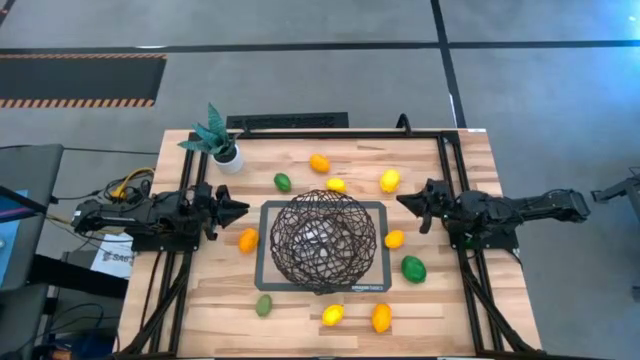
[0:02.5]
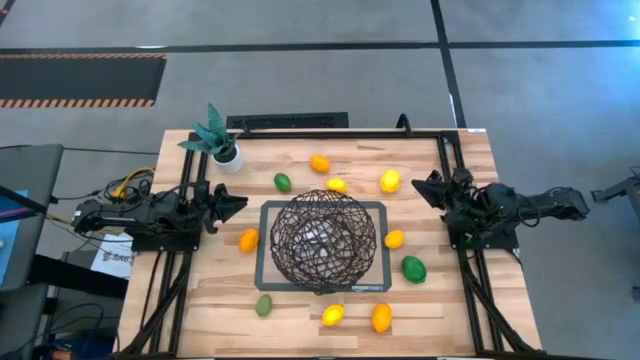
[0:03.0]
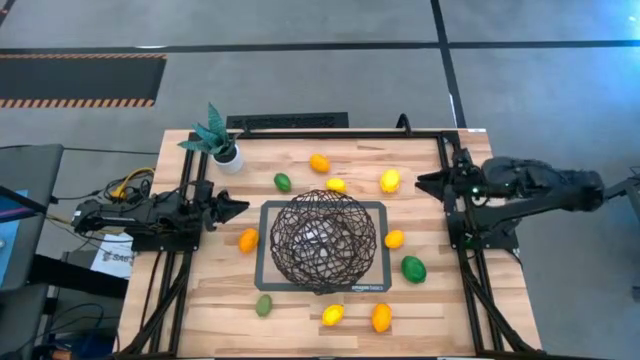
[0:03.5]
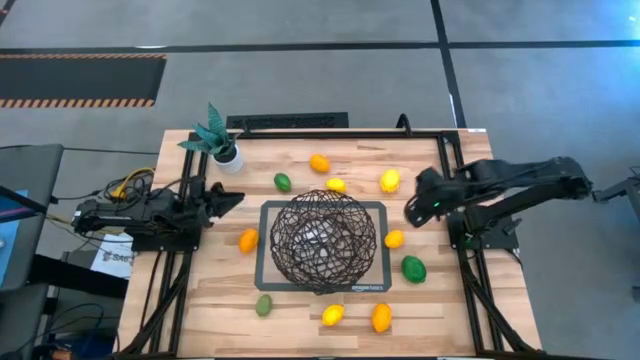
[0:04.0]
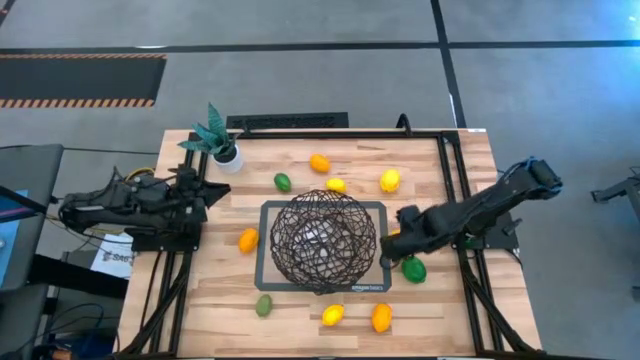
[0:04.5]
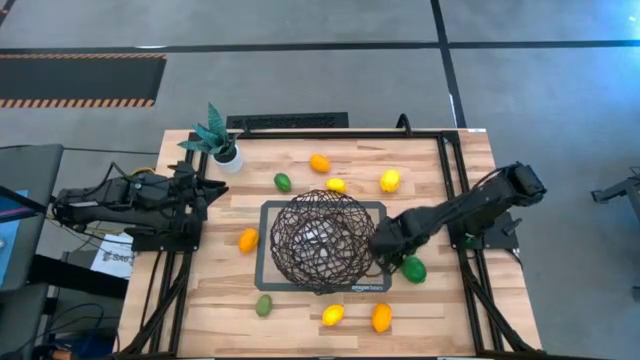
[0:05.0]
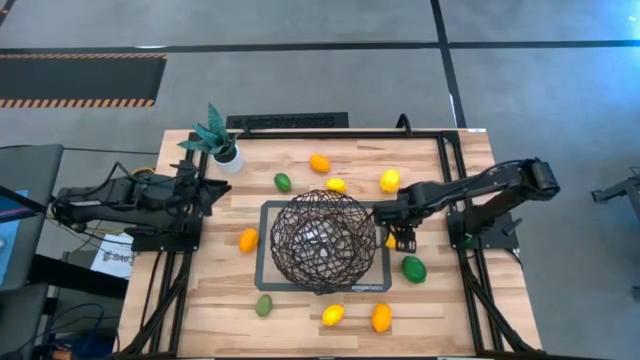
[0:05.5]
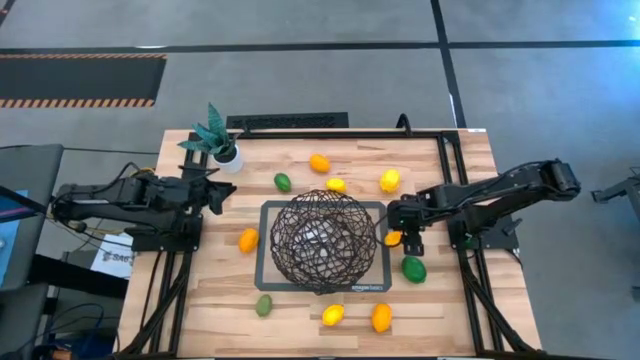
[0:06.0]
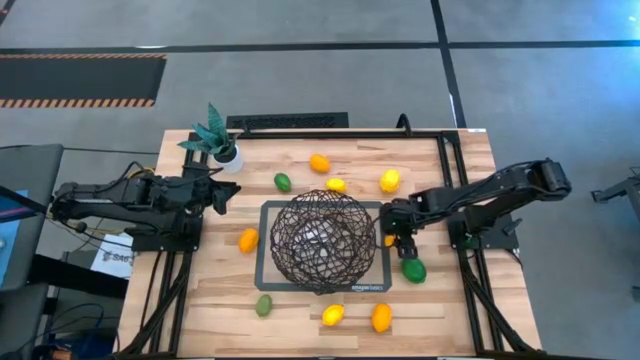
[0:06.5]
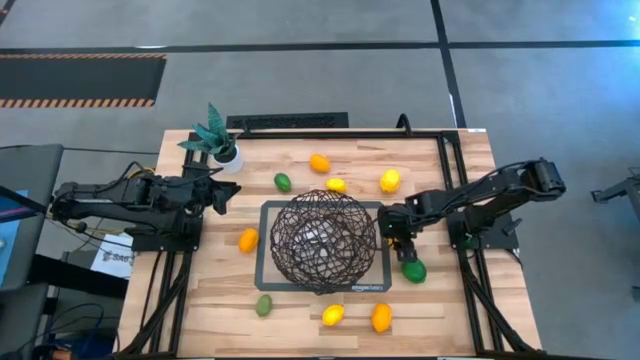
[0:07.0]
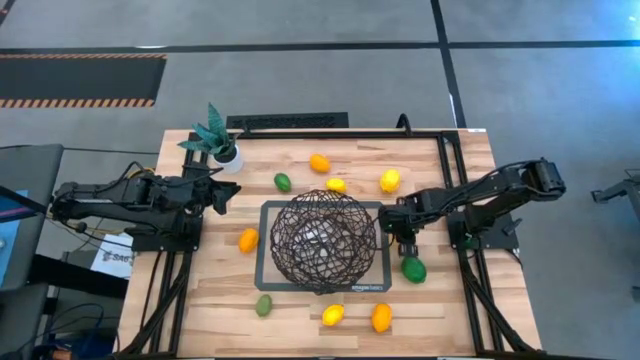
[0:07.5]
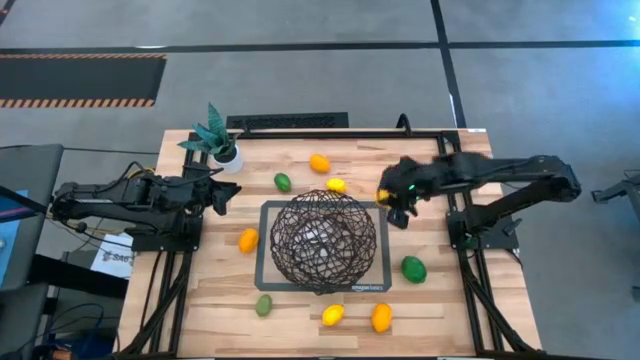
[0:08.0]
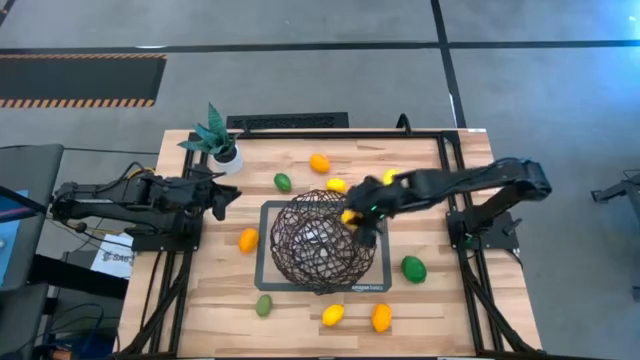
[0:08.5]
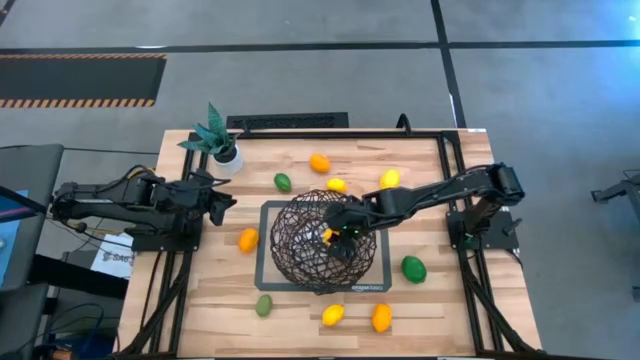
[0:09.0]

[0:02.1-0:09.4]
Task: Build produce basket
Put the lemon into the basket

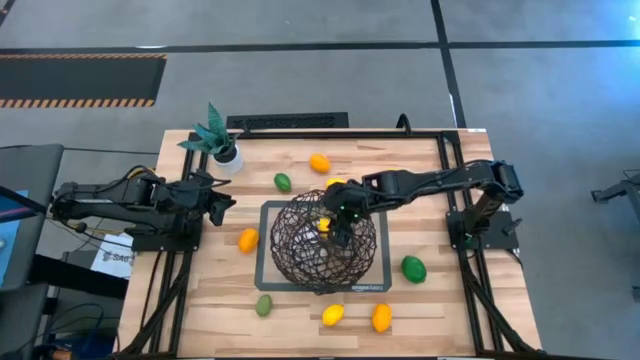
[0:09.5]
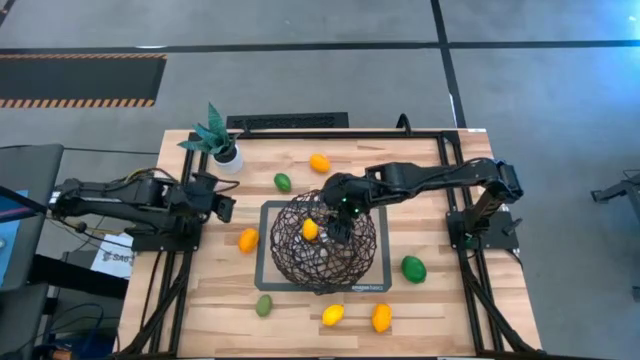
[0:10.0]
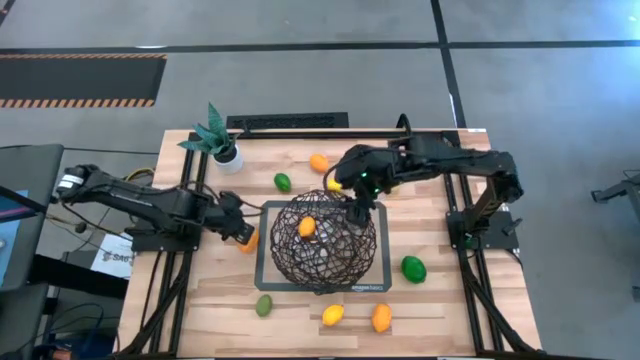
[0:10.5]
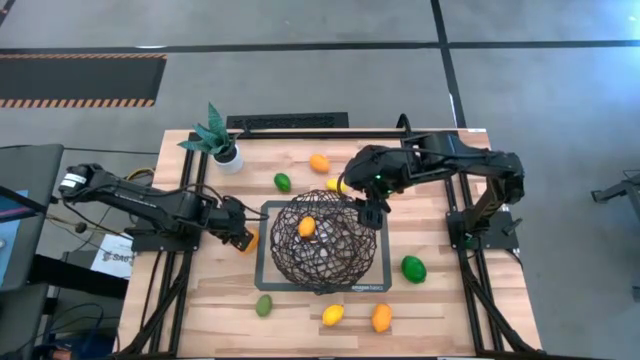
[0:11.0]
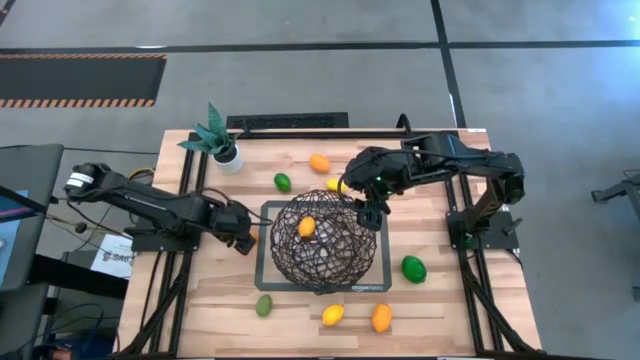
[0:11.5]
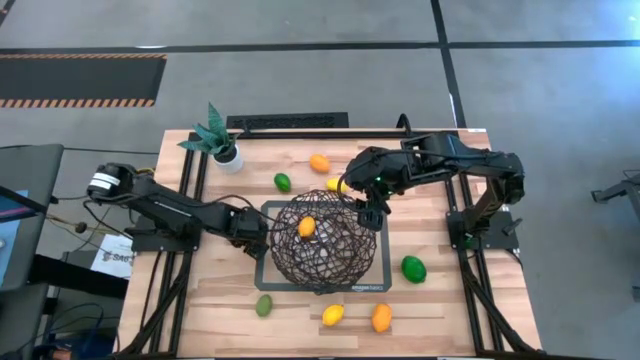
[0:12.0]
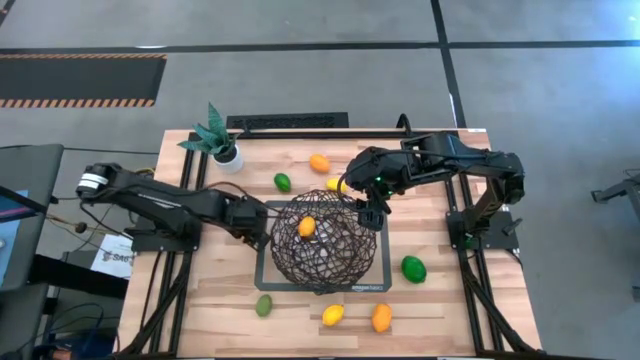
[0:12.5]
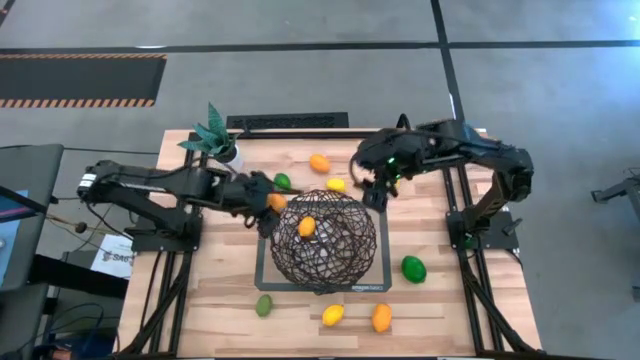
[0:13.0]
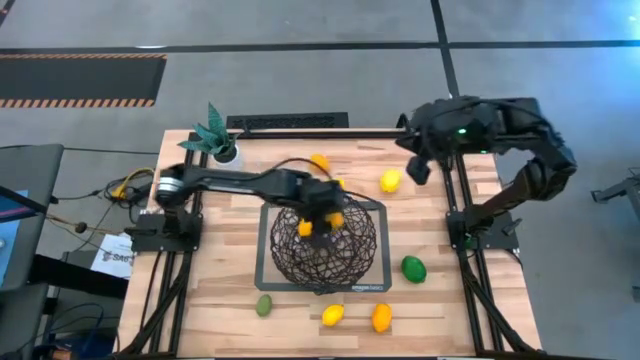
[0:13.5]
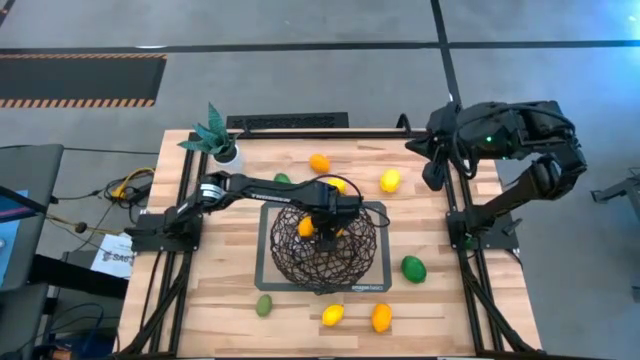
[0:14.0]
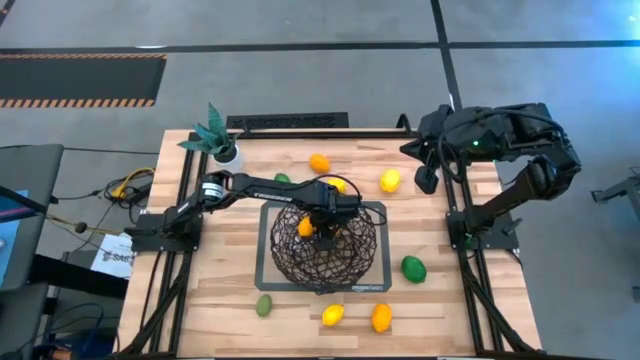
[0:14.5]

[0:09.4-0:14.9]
Put the lemon into the basket

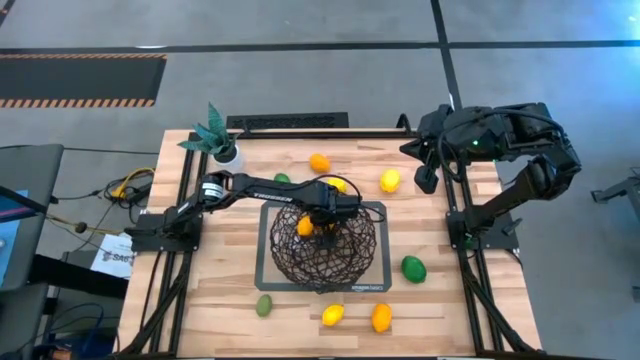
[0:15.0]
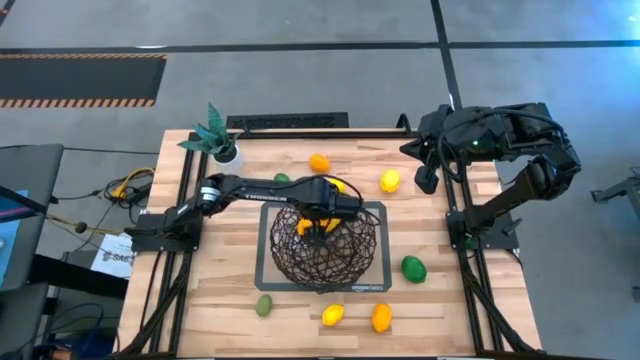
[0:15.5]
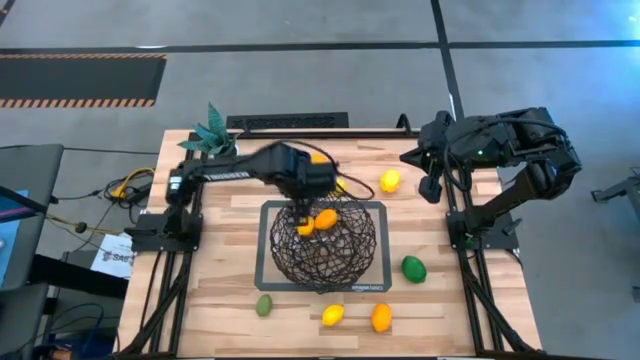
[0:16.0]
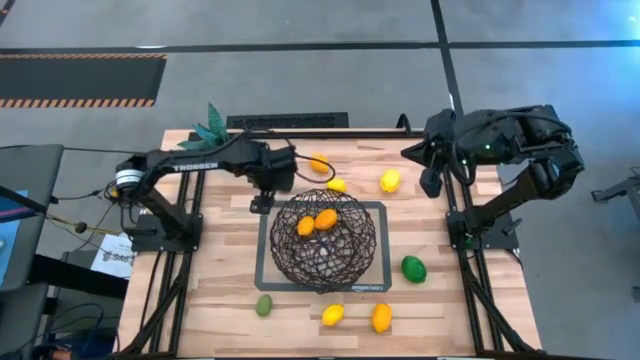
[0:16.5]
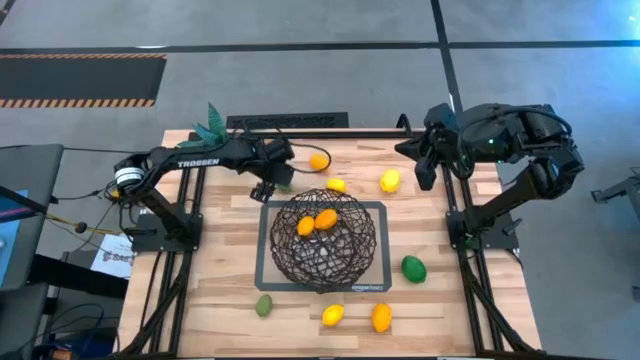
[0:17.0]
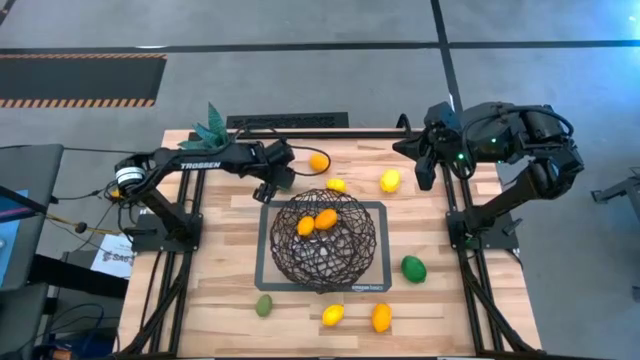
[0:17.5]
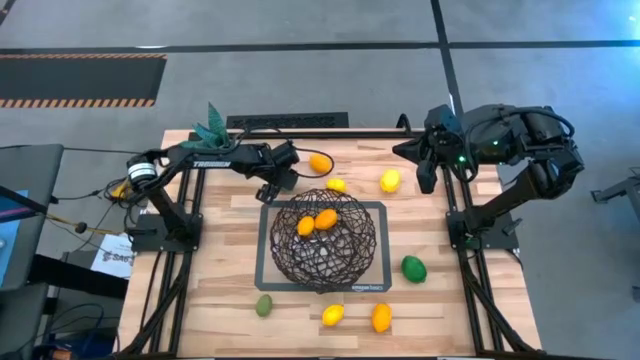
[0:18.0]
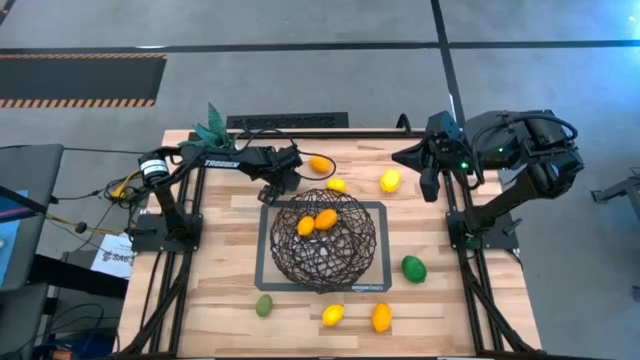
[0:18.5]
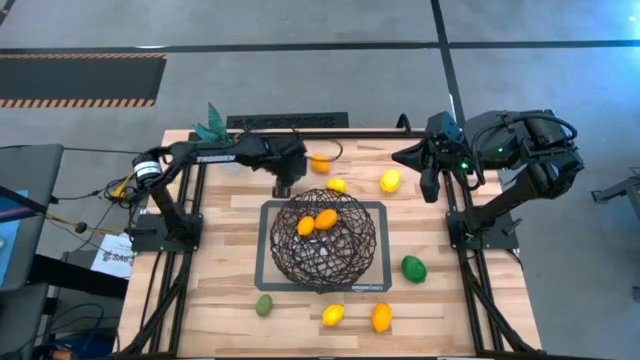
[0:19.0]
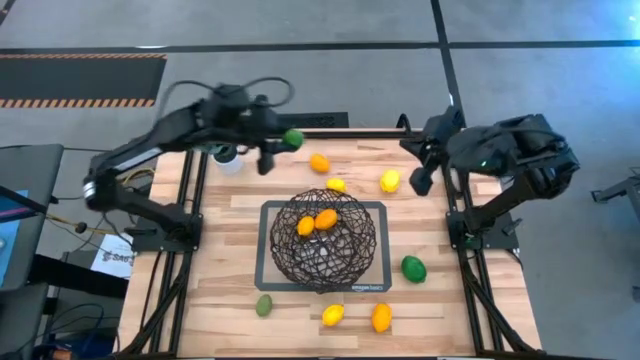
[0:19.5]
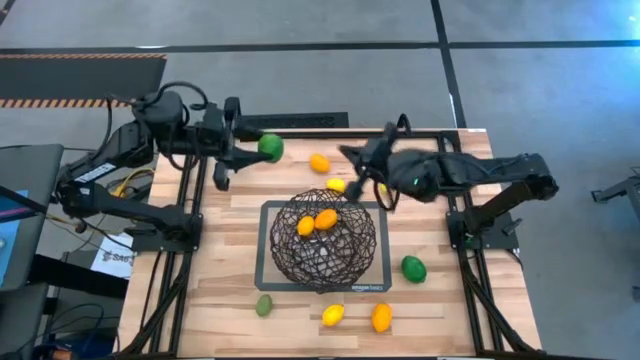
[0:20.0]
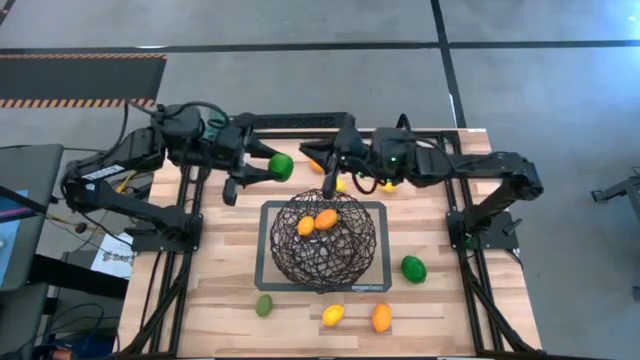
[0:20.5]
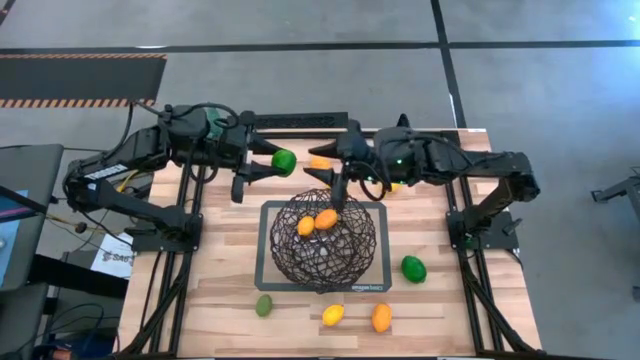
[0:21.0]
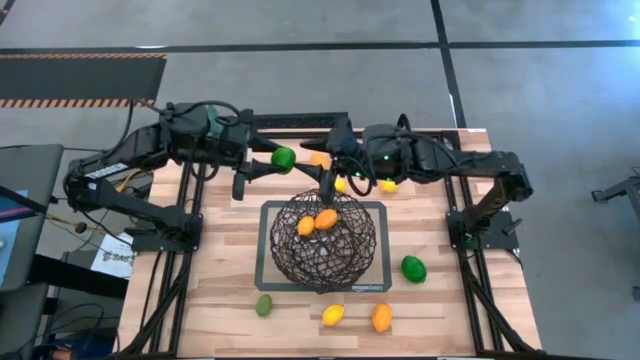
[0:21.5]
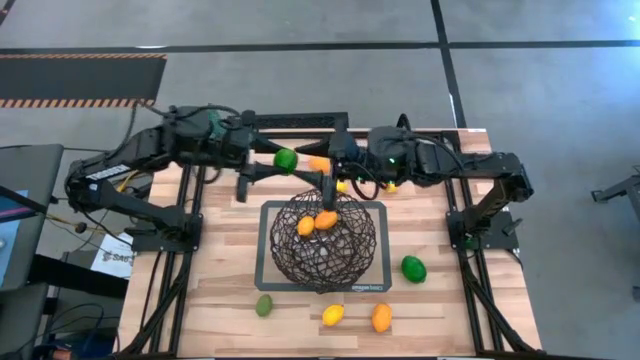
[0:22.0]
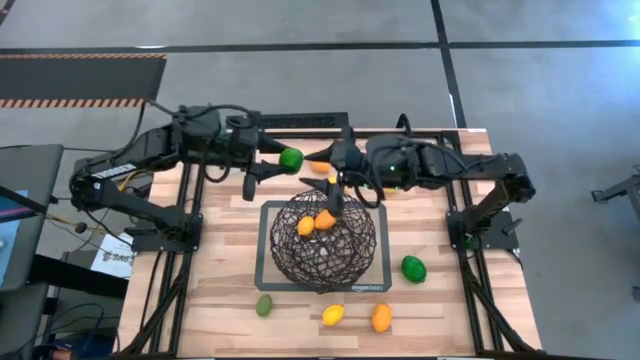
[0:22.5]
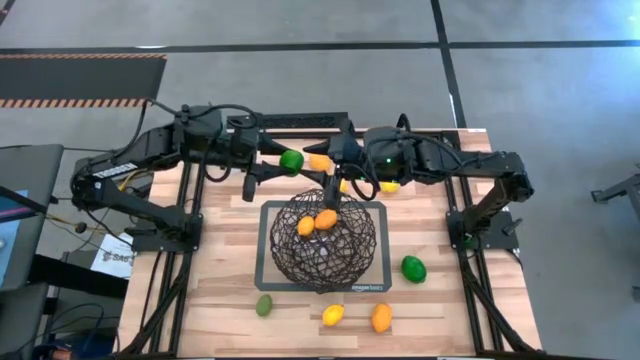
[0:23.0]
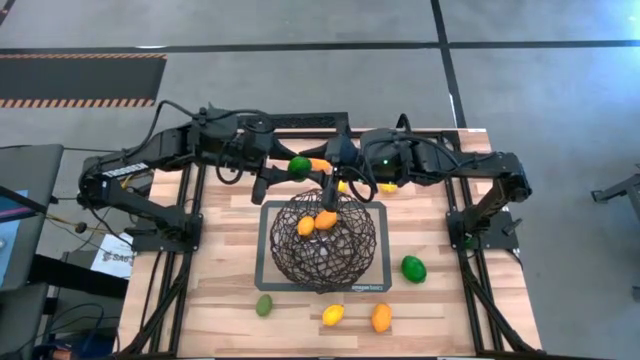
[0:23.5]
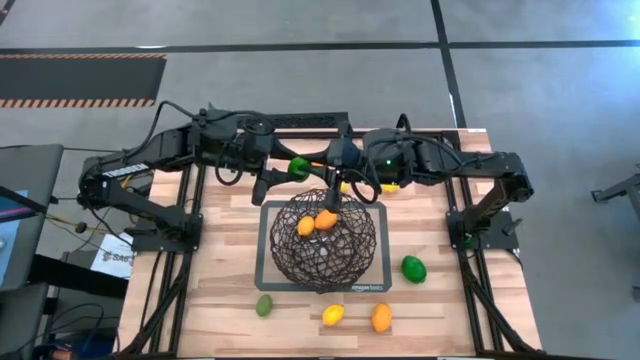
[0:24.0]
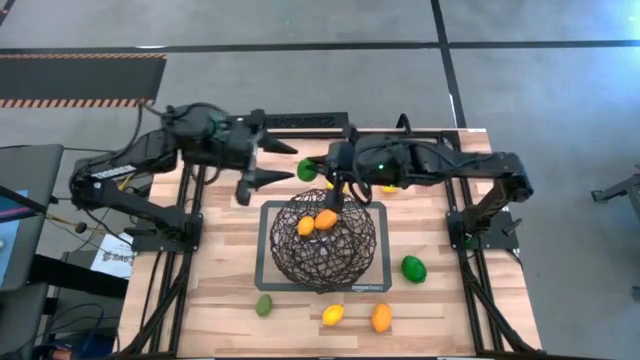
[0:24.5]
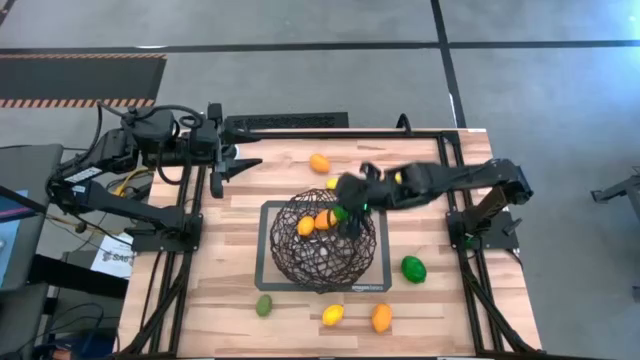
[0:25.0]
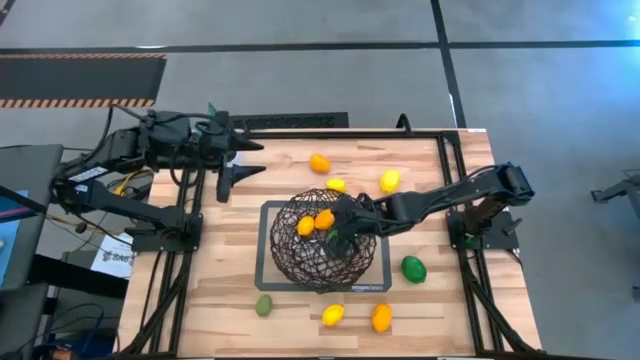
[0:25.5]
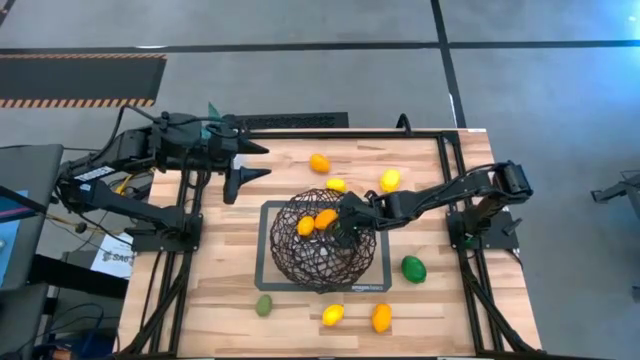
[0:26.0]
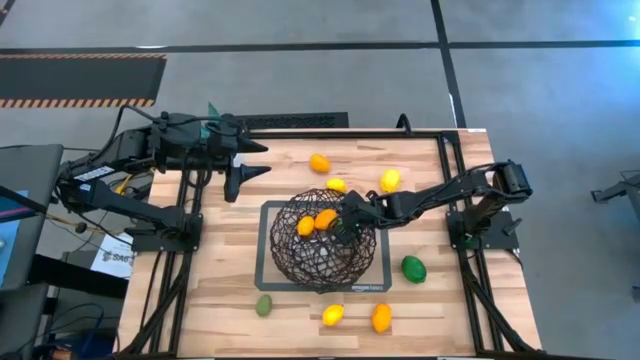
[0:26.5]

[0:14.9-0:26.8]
Put the top lime into the basket
